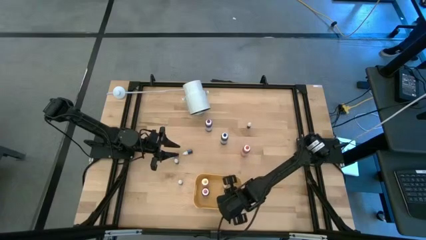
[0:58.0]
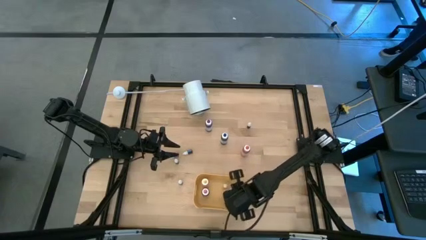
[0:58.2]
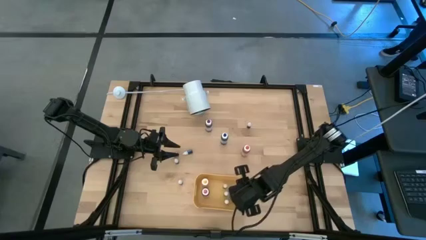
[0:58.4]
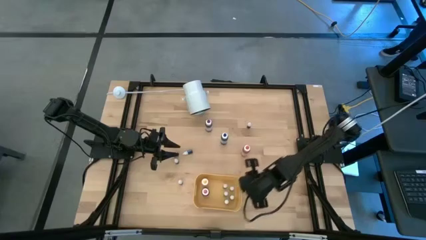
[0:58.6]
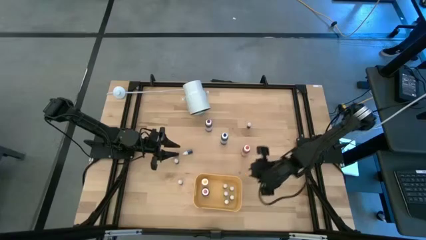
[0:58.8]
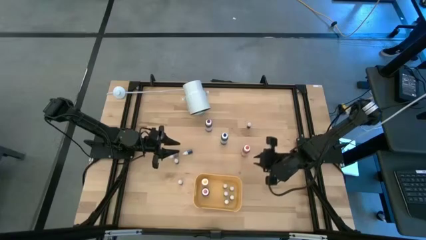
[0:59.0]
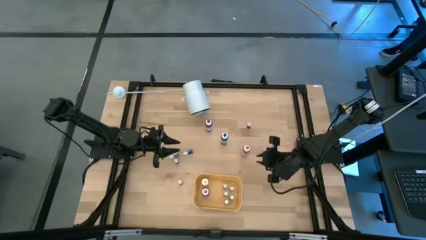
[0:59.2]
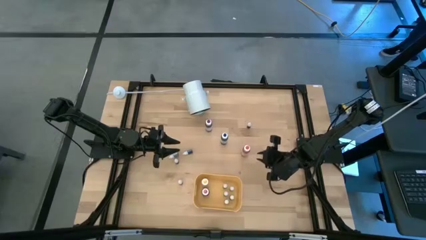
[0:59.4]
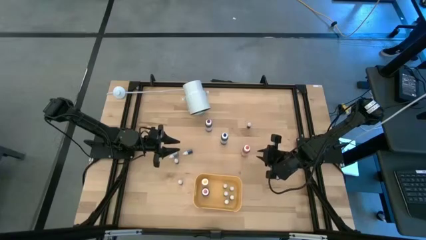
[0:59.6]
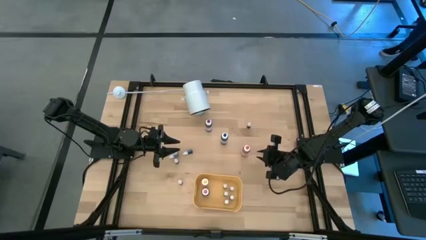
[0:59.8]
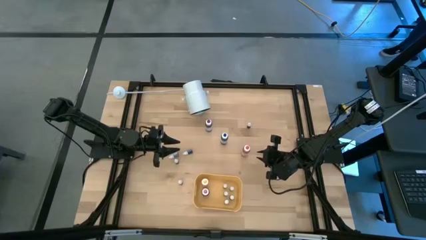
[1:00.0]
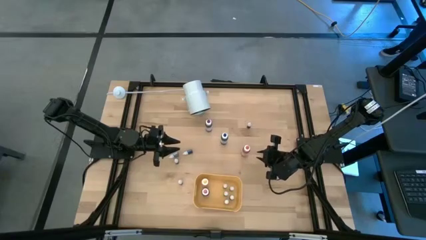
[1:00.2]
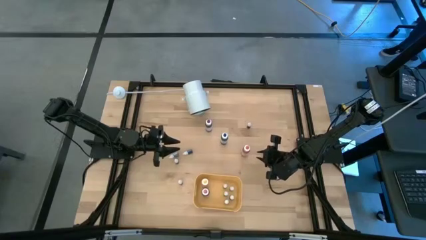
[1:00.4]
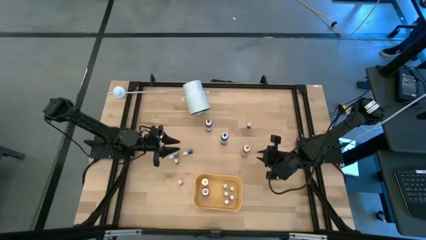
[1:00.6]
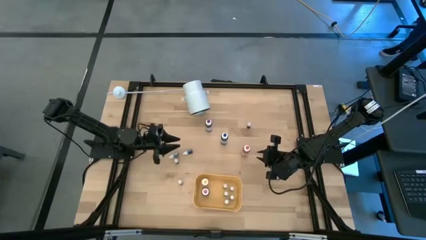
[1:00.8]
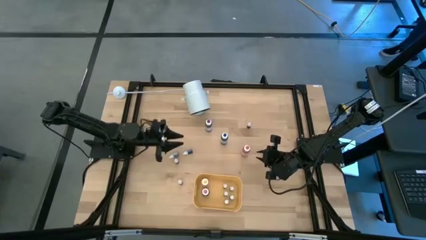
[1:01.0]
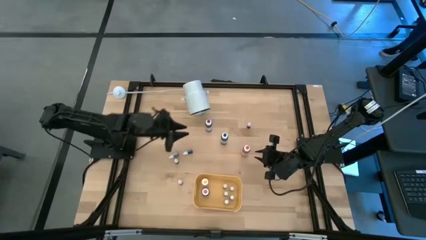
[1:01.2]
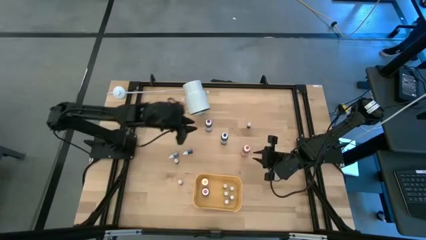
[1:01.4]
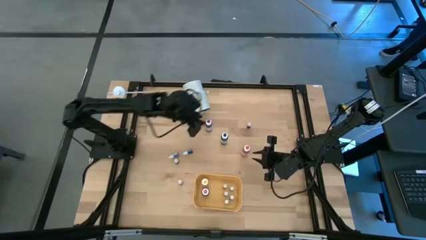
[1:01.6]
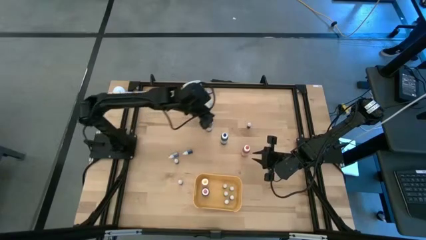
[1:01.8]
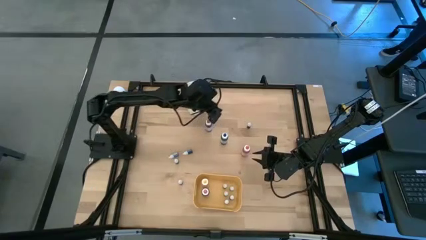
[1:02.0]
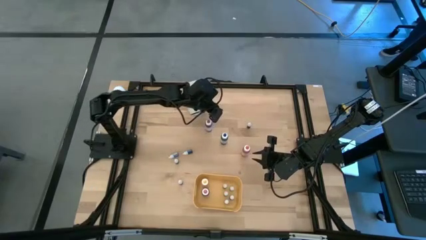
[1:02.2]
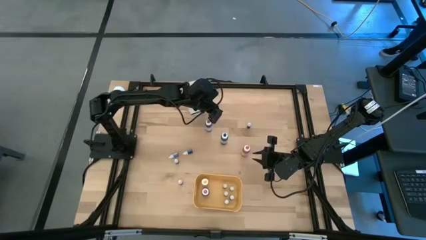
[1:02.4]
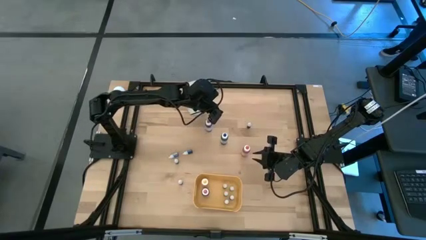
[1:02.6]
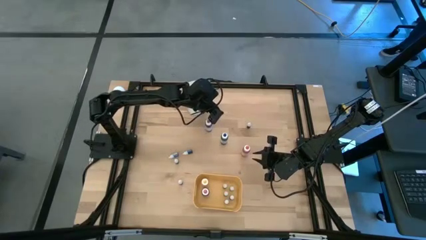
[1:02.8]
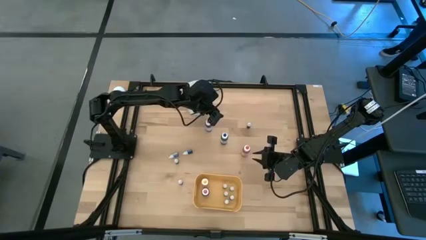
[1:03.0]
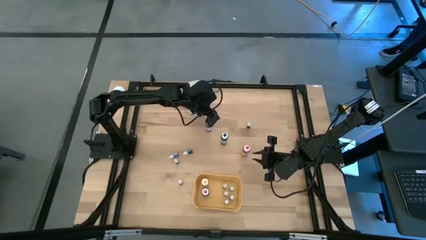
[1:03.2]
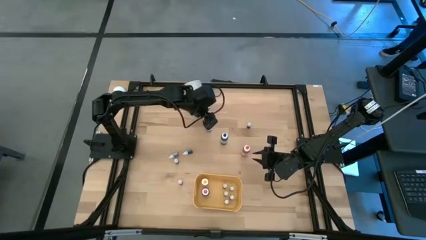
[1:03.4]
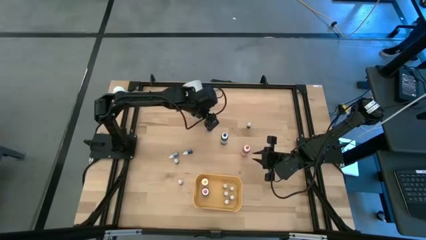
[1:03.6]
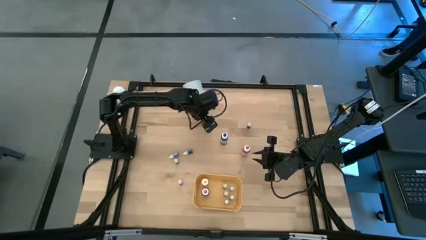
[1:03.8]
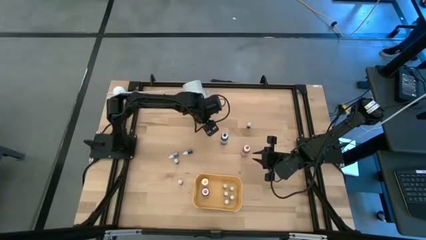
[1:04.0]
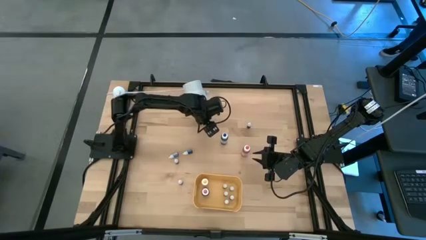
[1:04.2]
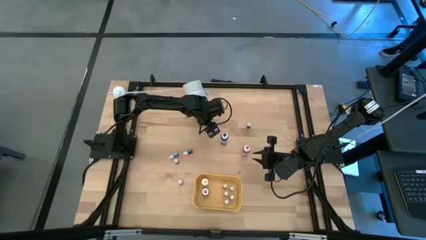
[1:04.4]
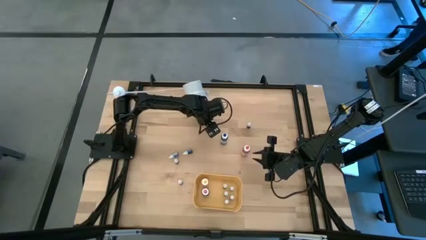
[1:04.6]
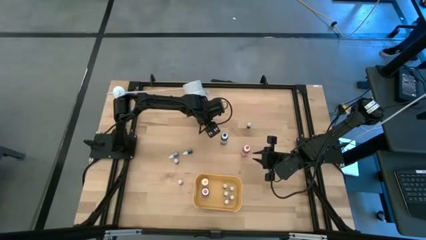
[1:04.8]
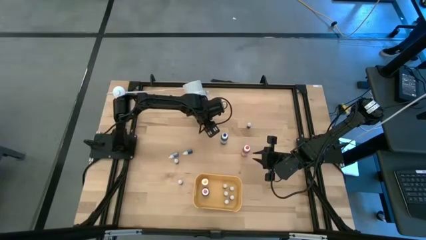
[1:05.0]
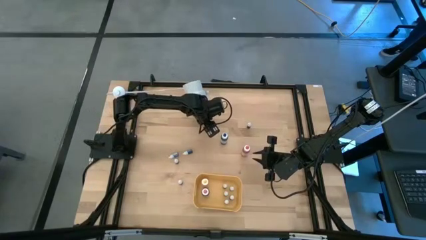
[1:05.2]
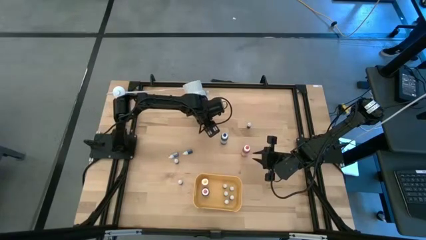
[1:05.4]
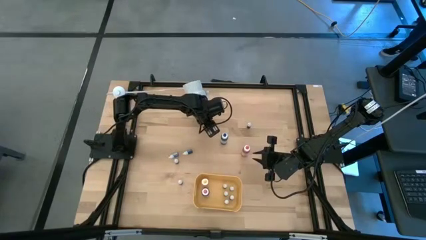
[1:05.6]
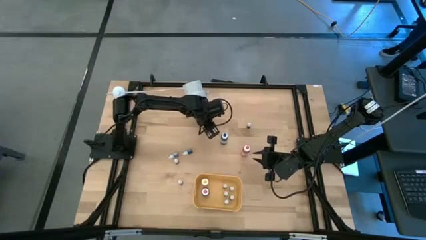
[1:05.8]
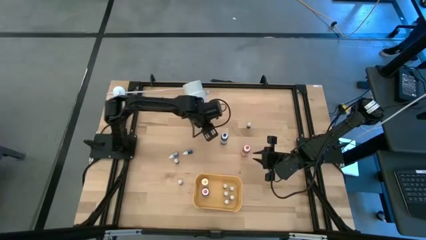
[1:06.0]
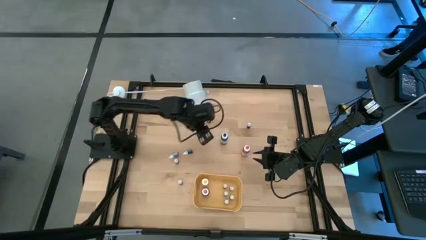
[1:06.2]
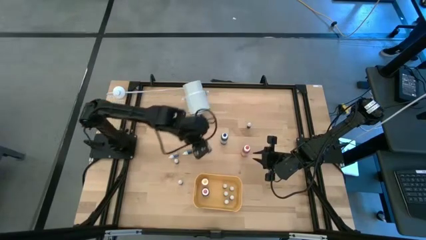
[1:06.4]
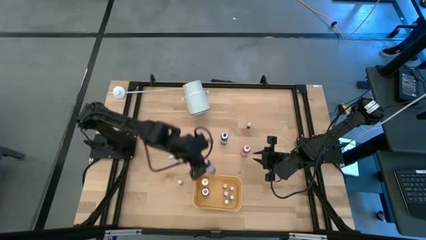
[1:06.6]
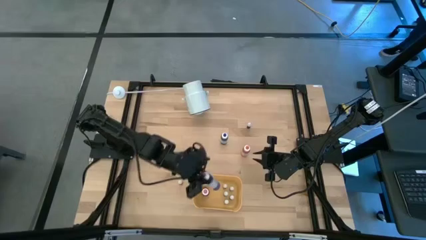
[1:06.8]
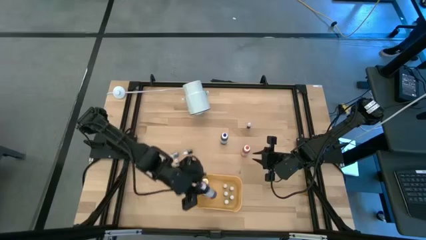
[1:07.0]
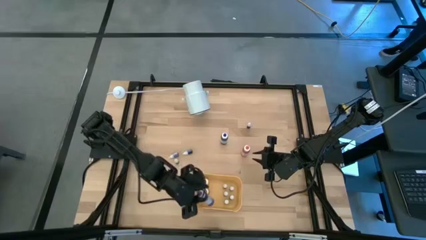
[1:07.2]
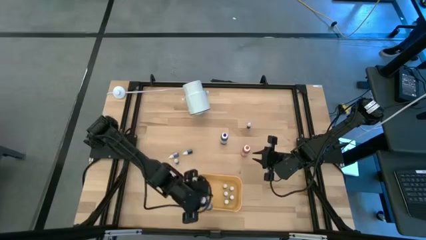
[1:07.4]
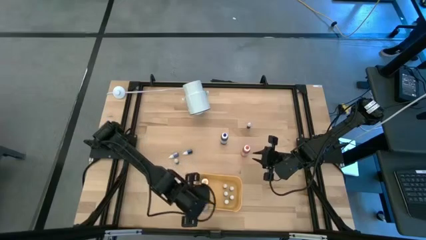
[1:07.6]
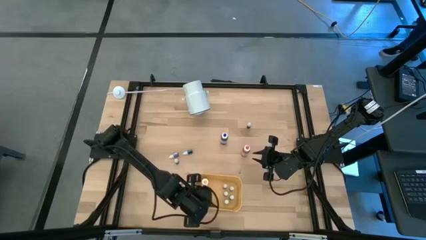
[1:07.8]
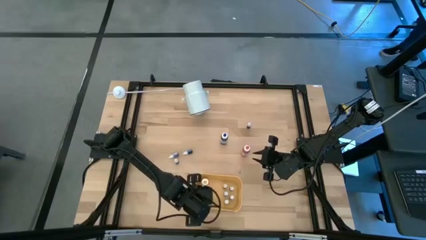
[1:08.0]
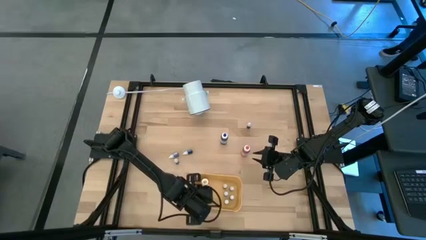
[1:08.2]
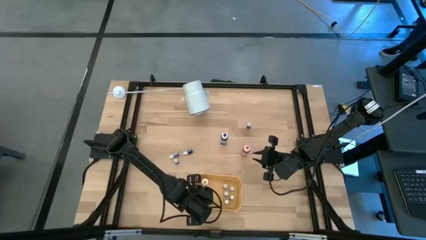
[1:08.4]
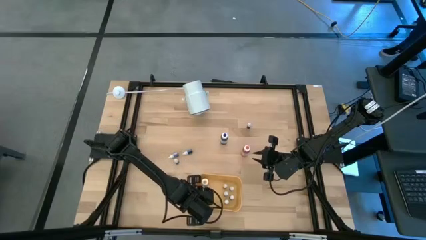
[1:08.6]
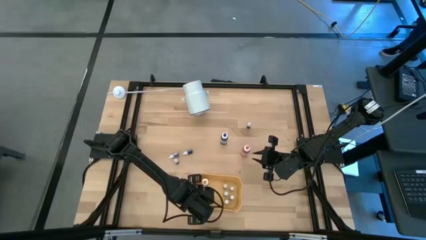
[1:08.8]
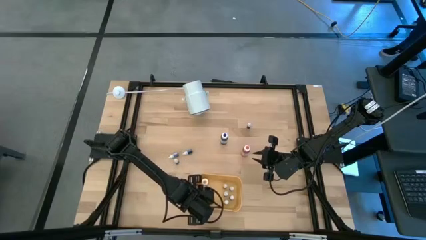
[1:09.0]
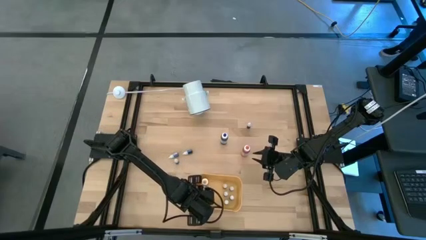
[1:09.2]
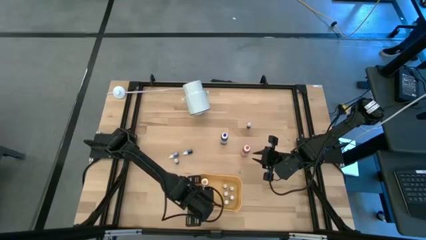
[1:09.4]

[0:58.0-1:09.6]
Task: Pick & Place food coloring
Put the big purple food coloring bottle into the yellow bin

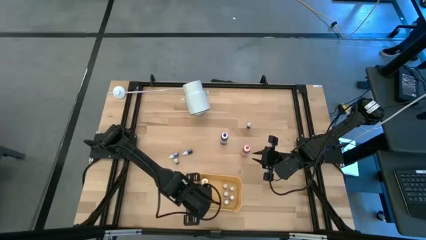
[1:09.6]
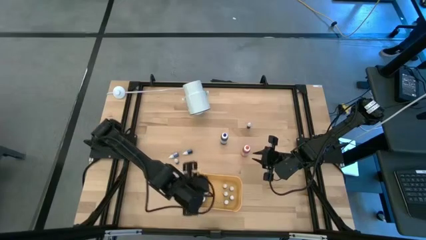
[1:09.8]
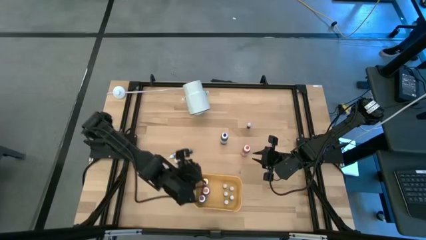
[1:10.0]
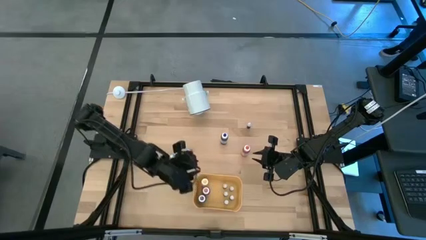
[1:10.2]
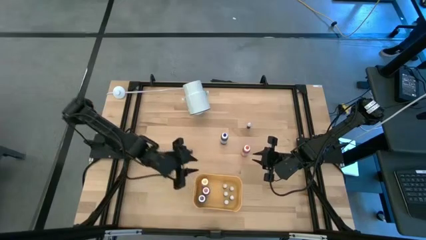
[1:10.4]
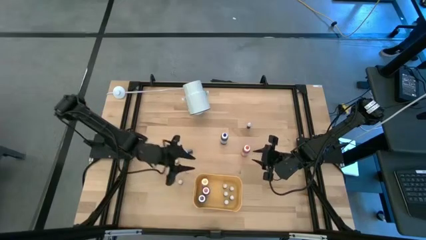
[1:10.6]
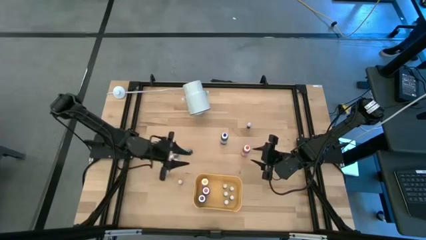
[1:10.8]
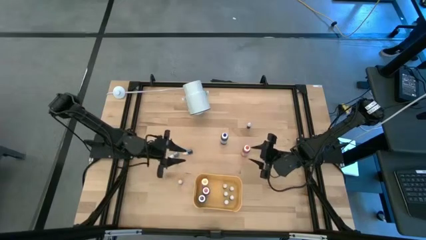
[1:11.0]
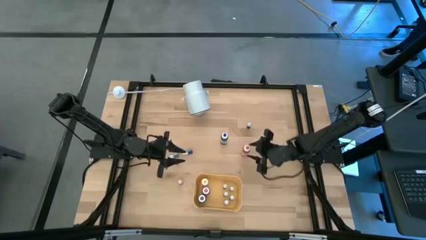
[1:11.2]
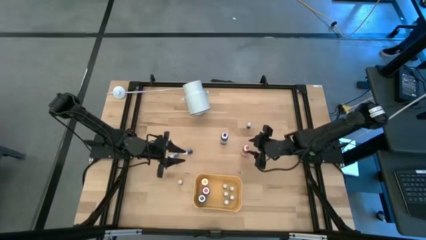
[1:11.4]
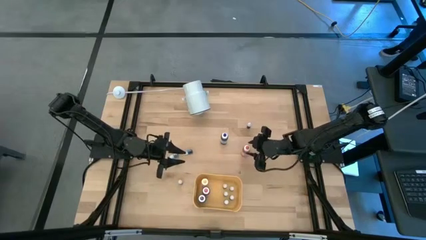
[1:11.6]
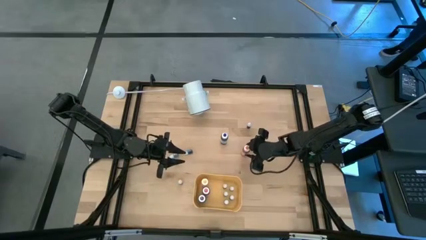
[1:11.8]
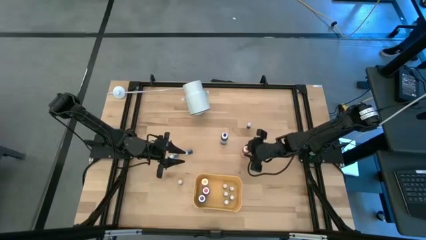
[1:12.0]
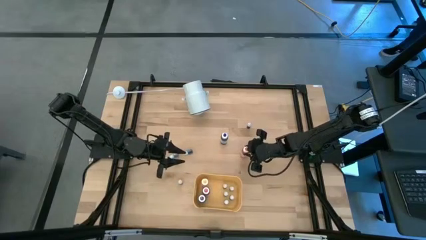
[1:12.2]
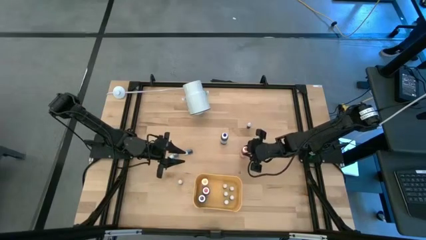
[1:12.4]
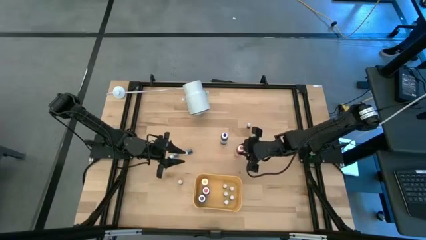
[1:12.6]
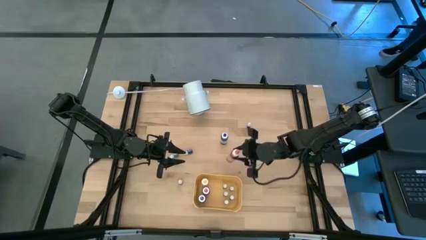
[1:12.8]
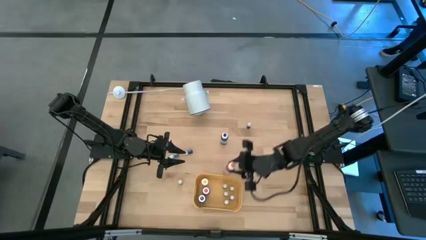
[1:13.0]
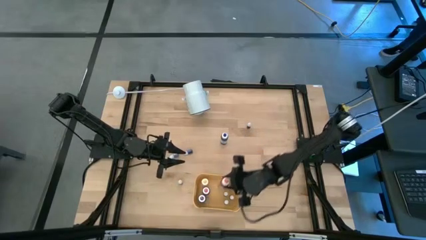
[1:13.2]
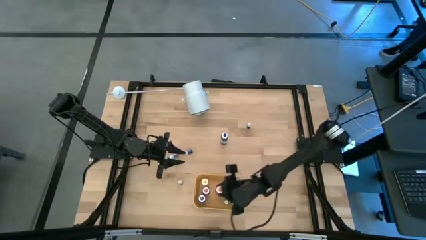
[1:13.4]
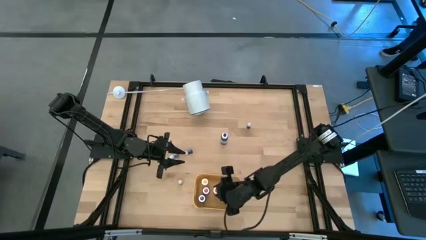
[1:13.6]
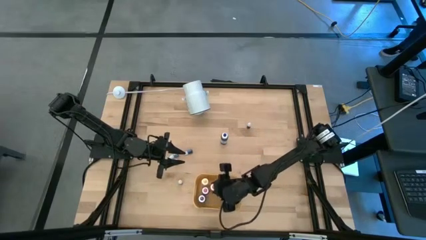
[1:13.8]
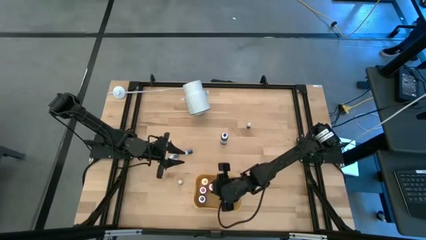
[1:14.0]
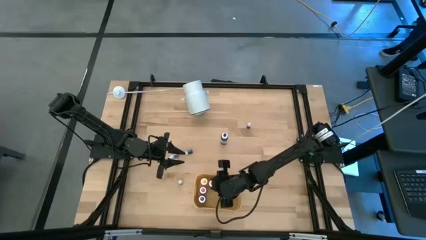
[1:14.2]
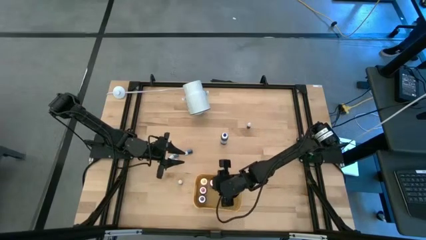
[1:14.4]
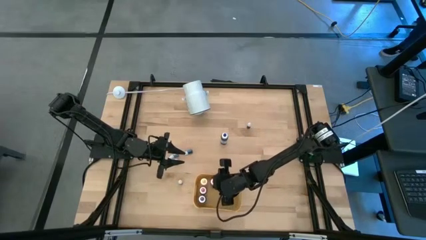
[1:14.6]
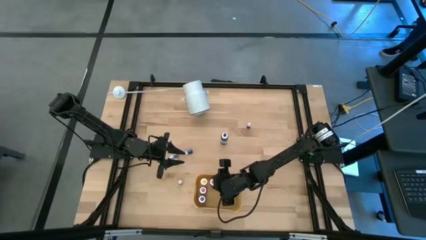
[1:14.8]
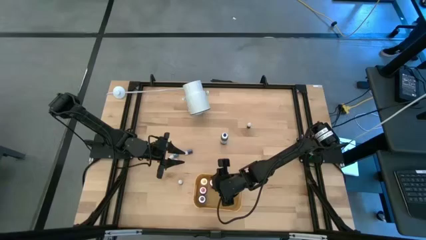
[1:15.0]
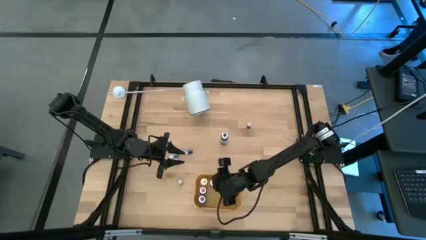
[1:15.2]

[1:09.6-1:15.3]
Put the big orange food coloring bottle into the yellow bin
